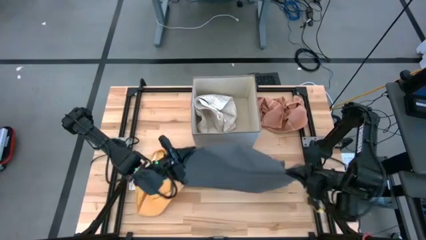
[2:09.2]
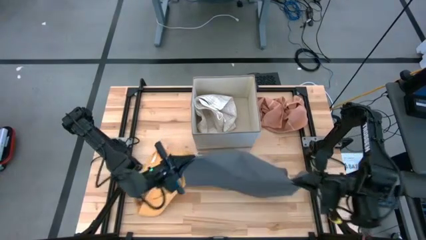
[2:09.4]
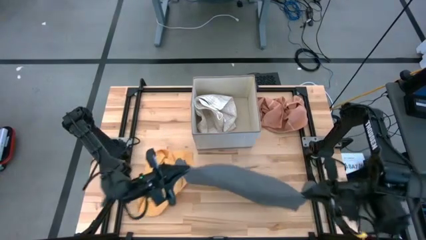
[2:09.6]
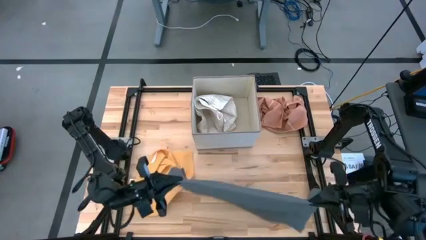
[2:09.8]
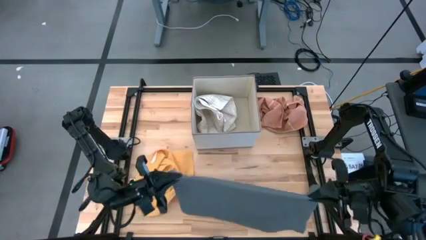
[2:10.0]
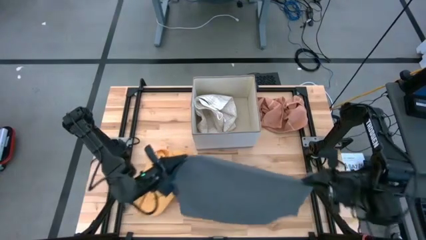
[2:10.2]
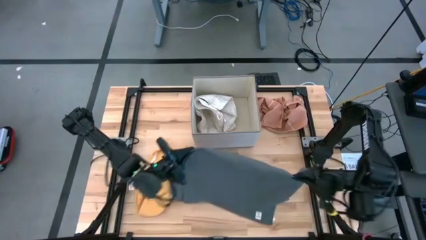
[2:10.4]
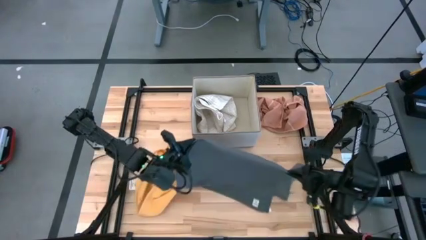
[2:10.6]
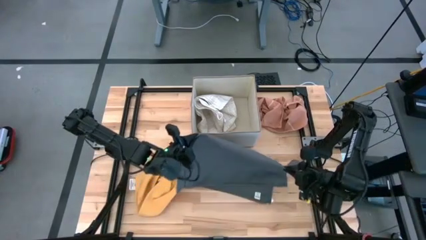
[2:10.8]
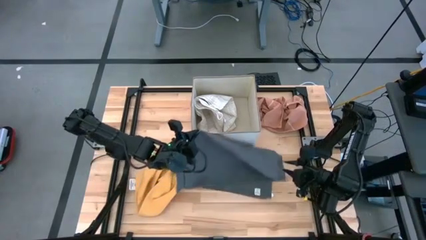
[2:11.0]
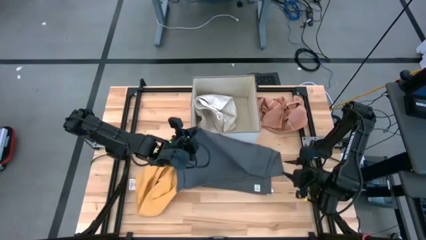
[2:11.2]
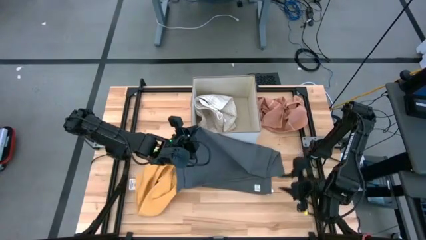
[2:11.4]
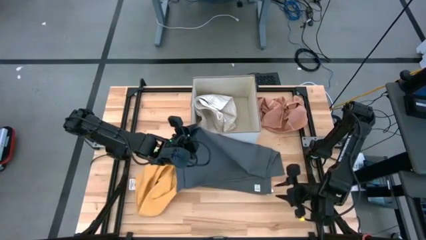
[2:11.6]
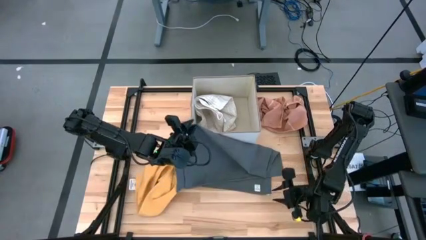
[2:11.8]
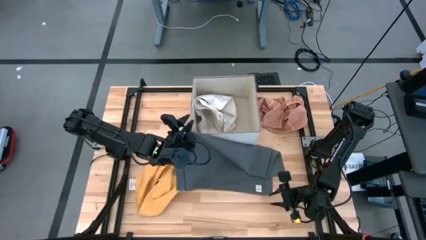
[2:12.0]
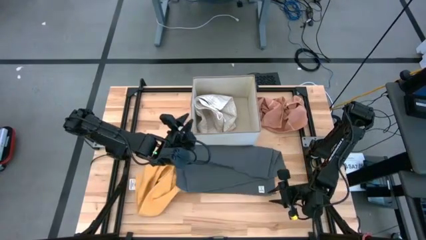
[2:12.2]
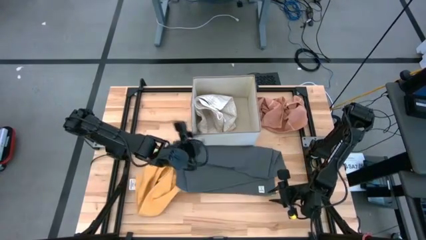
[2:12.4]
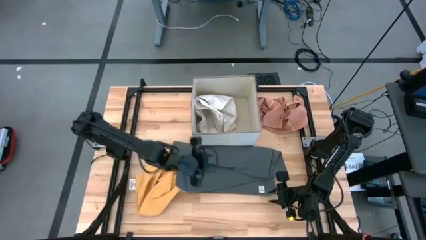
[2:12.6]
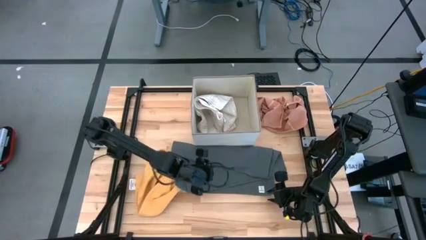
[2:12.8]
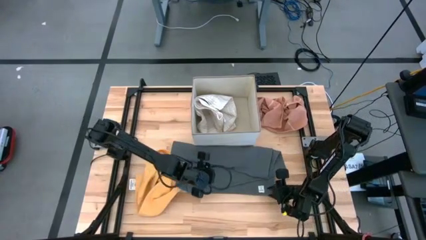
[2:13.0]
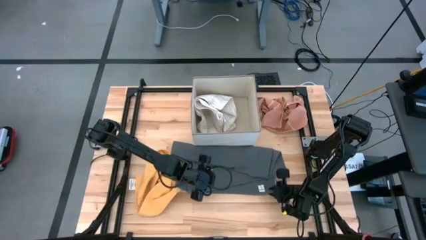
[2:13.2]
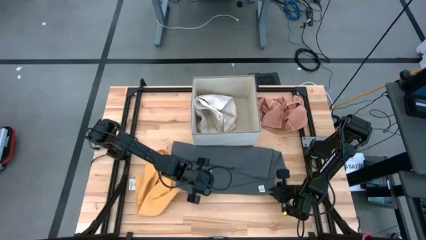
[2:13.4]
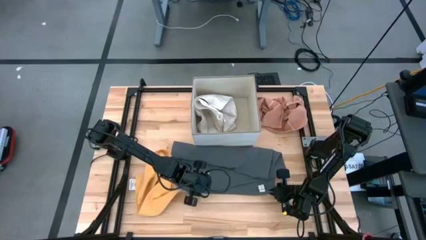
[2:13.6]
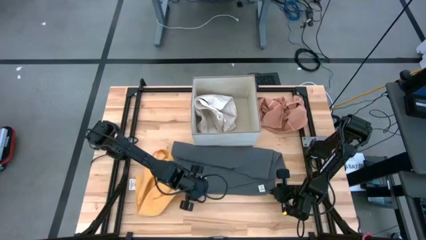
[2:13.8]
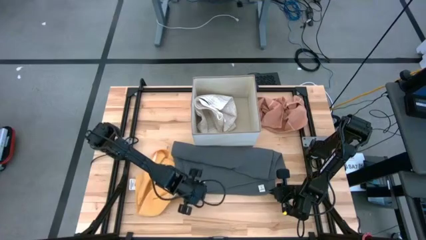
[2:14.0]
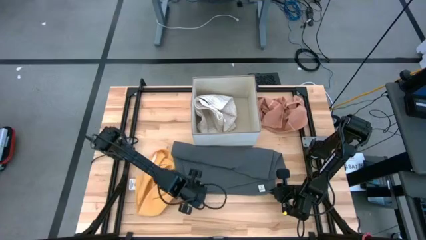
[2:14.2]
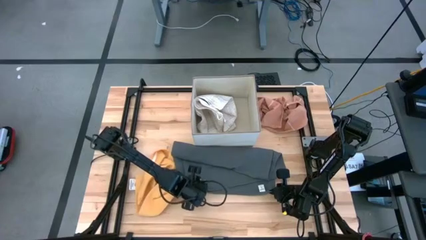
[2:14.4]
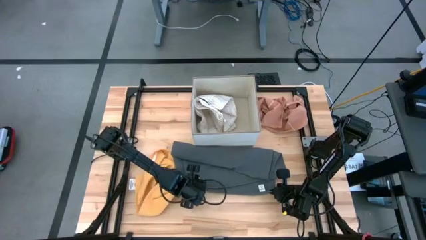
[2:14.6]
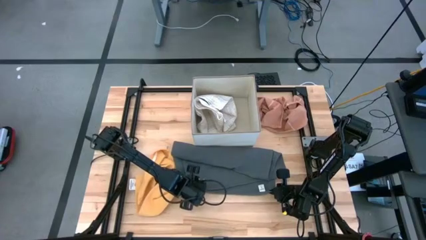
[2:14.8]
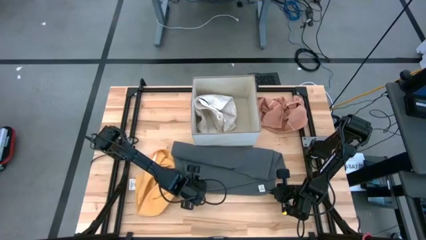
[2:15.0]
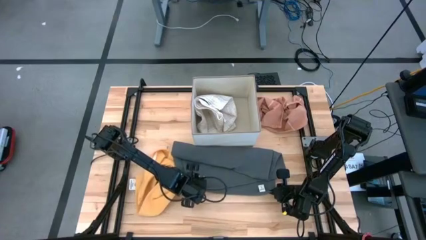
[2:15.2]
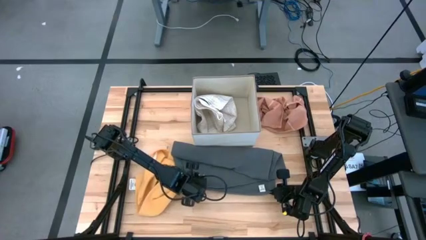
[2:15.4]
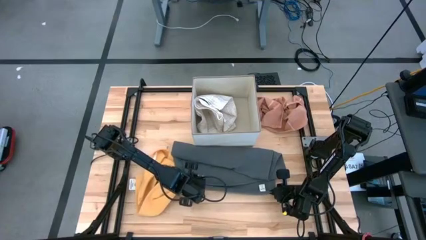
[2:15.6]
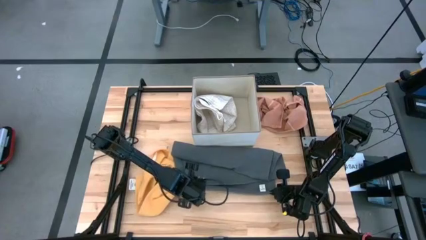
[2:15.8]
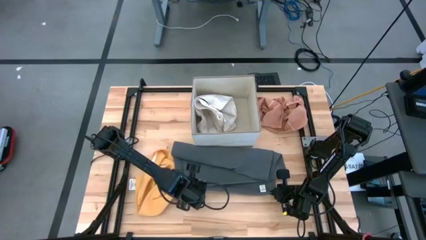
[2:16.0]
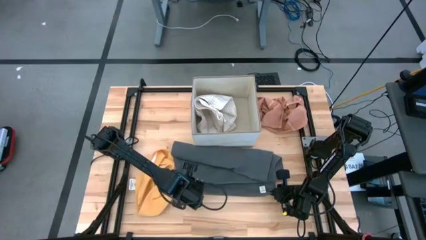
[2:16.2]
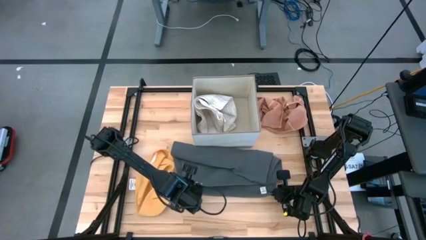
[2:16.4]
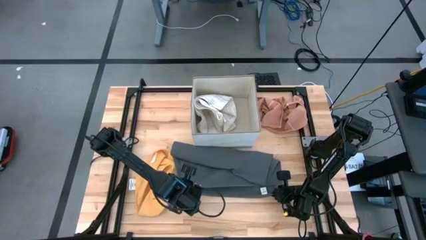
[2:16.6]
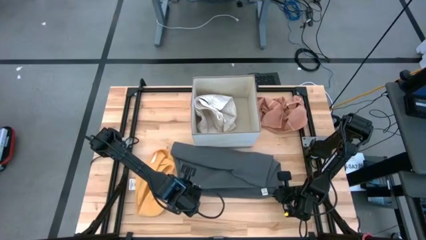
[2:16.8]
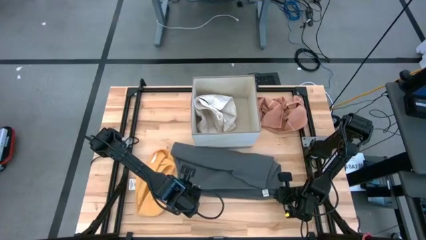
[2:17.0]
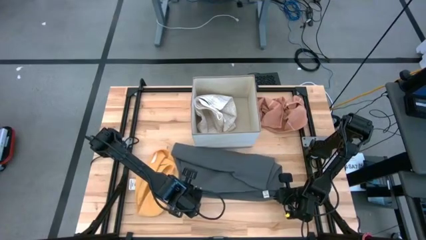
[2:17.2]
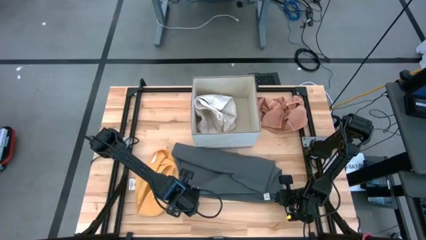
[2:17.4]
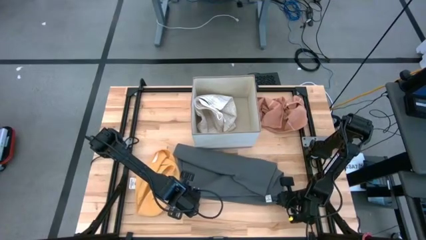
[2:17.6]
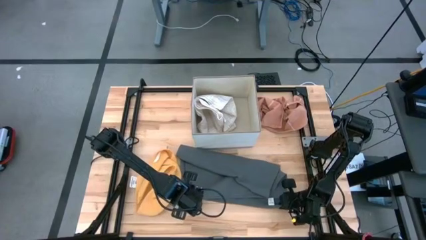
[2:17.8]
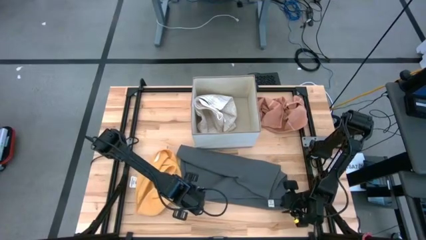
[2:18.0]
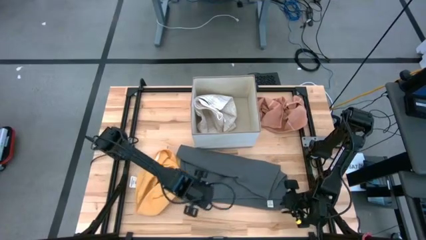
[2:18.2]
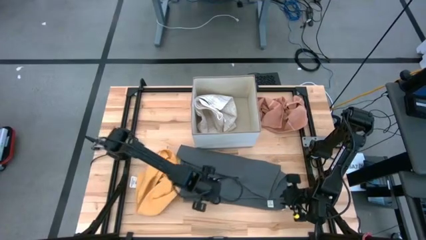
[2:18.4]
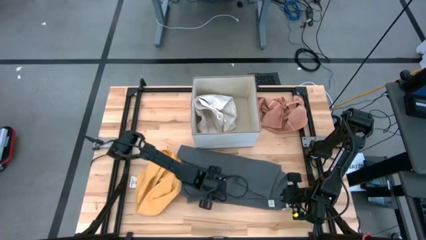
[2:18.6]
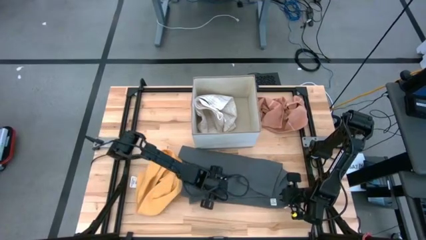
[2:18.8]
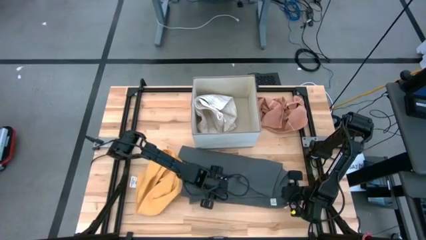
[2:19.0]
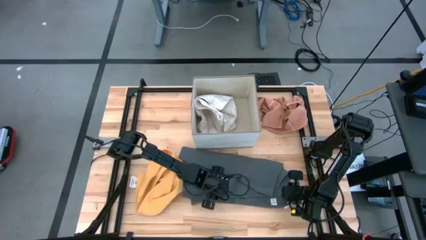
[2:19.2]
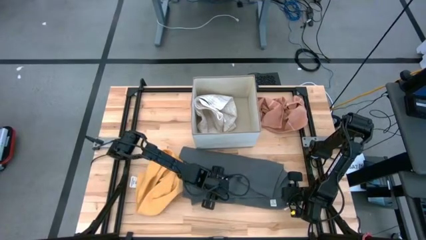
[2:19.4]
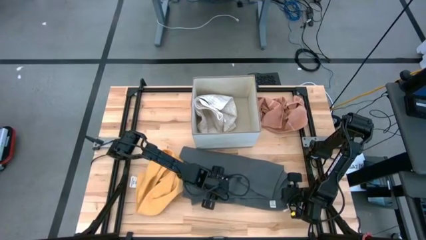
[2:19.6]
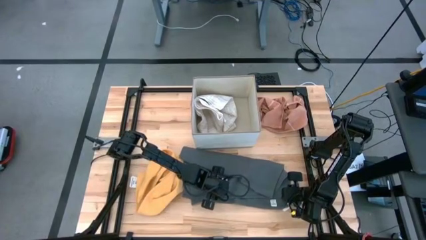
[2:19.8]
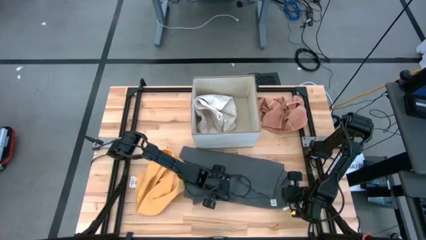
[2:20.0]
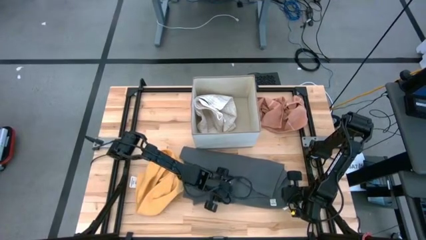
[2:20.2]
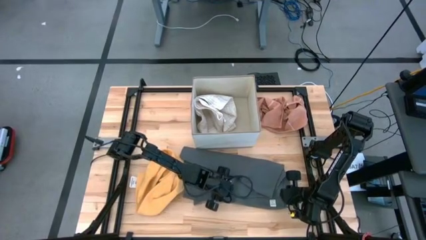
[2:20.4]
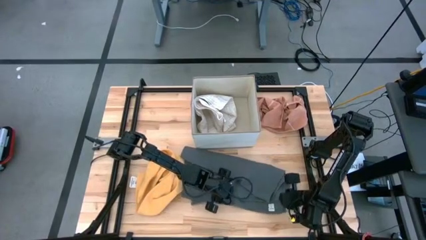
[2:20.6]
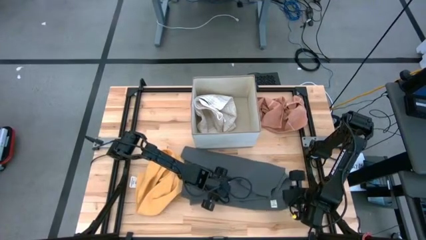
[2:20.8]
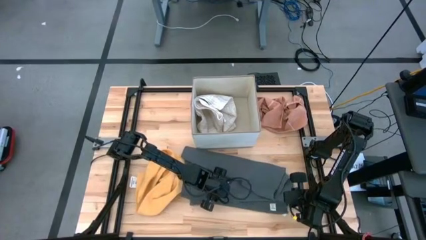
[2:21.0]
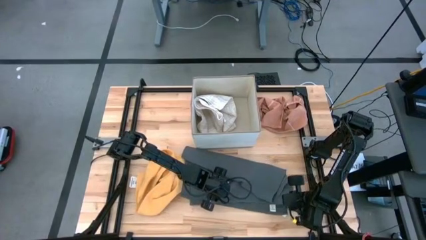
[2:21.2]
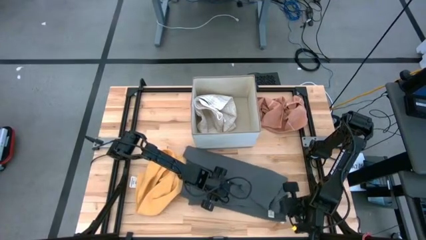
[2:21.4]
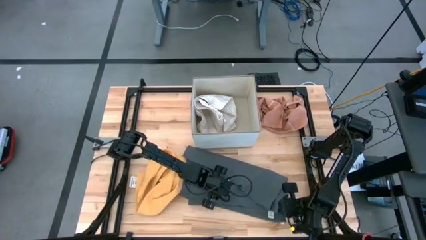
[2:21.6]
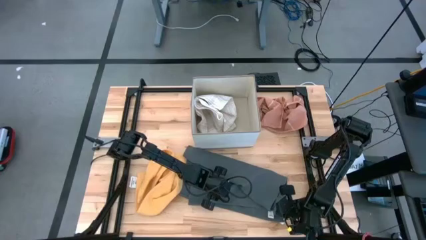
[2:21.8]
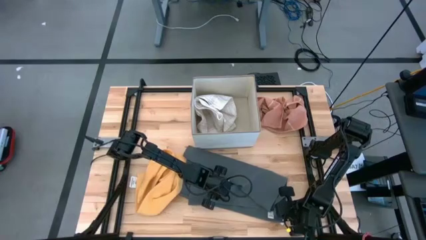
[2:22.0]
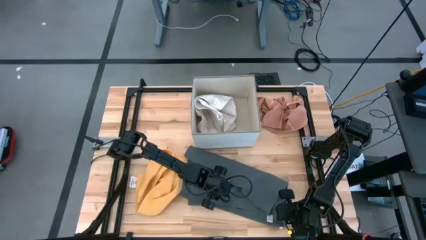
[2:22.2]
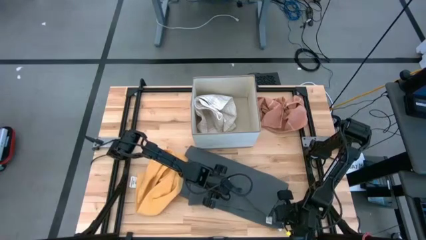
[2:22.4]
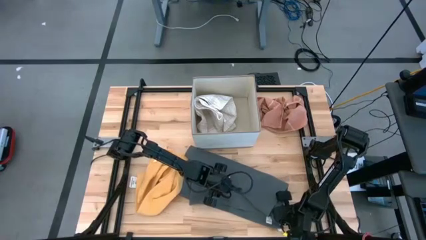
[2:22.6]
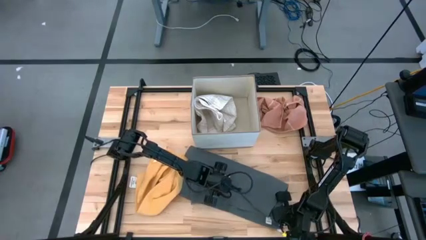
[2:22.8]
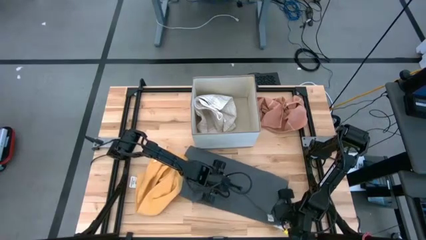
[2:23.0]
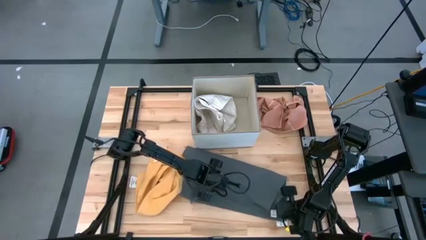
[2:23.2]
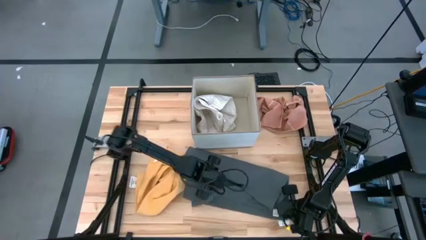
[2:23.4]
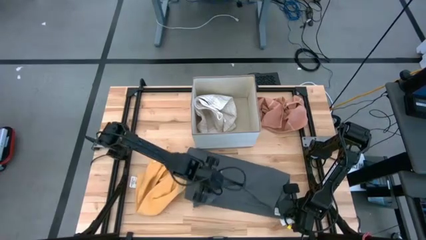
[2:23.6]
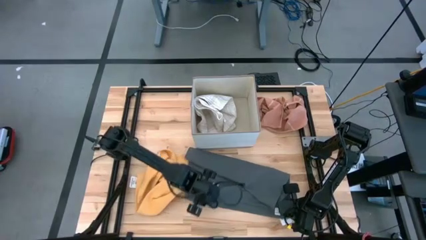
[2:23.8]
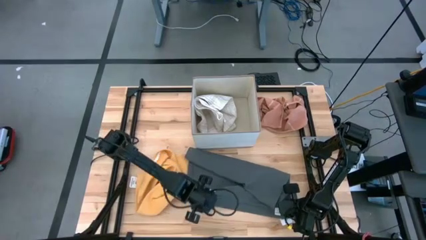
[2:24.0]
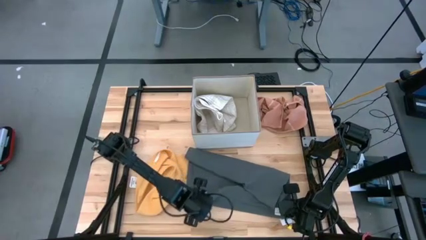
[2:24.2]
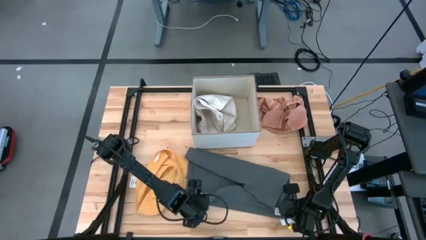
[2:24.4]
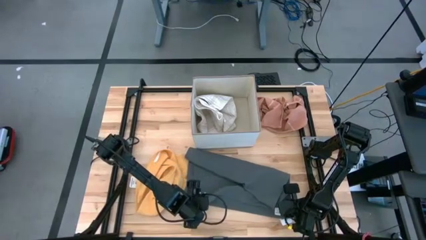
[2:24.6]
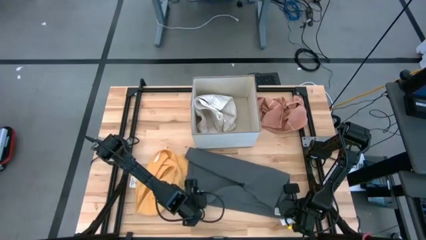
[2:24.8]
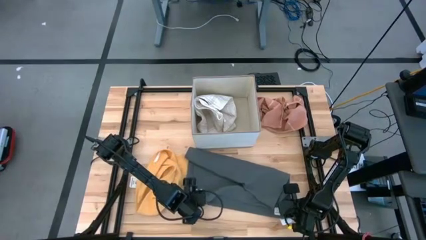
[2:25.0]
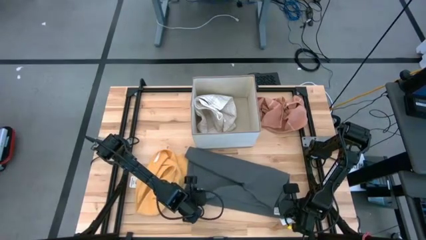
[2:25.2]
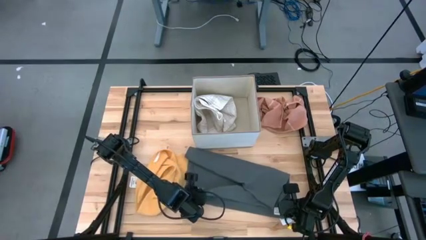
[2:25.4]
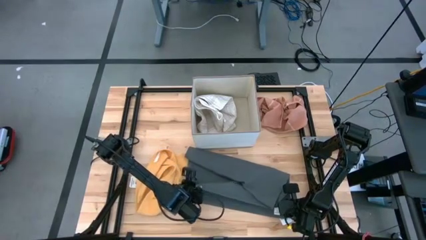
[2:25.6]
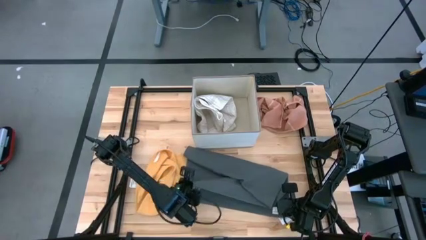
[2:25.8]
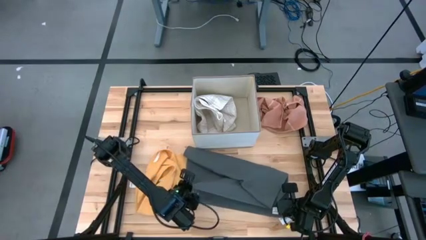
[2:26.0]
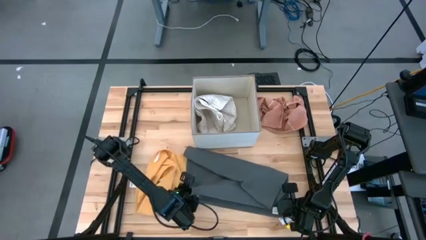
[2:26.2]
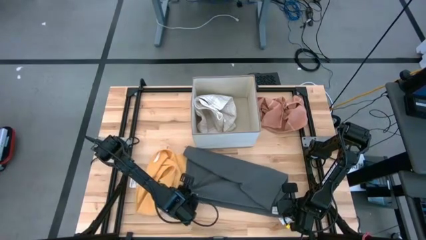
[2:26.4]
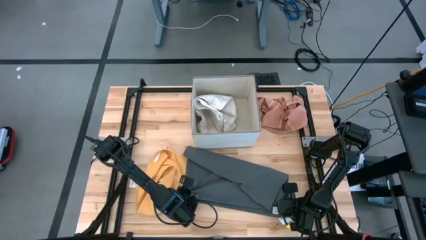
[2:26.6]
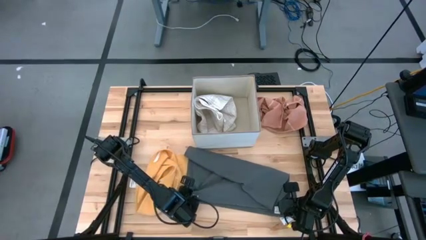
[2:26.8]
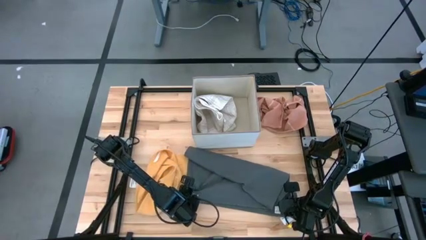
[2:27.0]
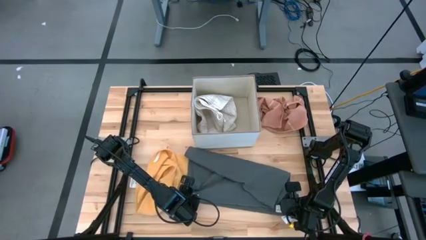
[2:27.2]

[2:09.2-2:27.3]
Task: Fold towel
Fold the gray towel
